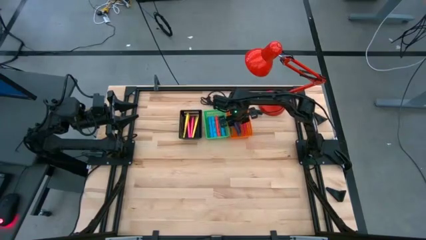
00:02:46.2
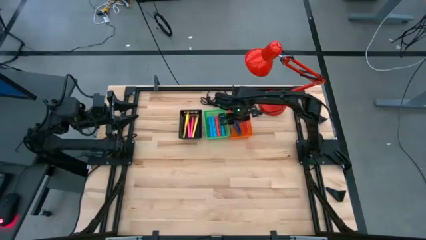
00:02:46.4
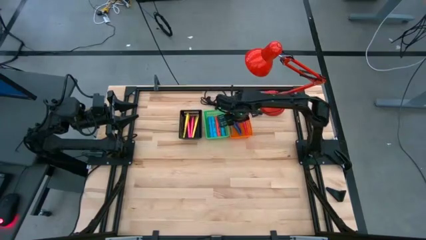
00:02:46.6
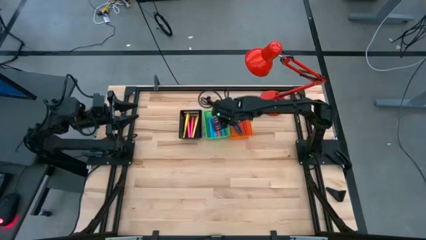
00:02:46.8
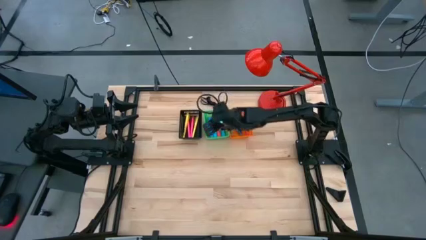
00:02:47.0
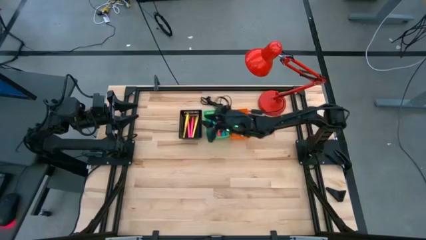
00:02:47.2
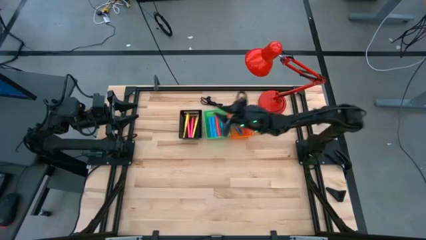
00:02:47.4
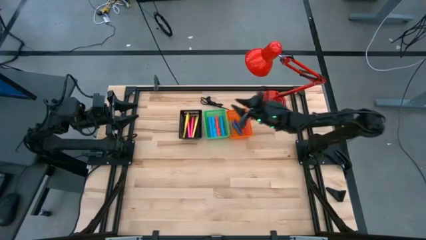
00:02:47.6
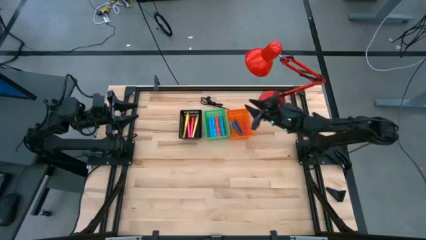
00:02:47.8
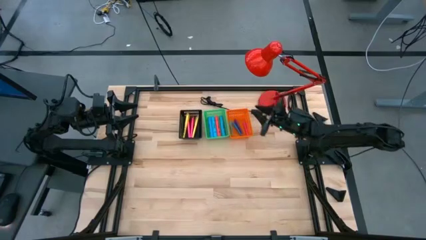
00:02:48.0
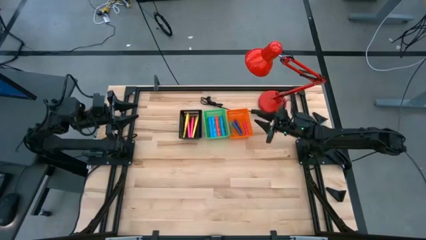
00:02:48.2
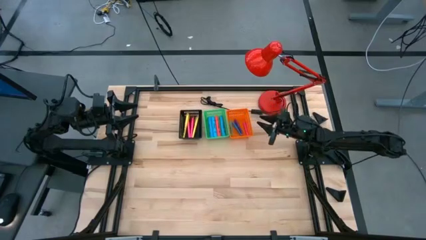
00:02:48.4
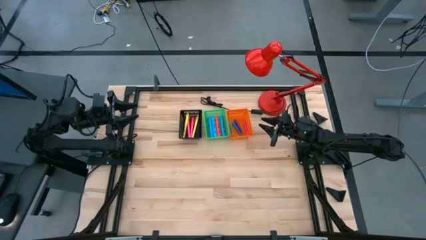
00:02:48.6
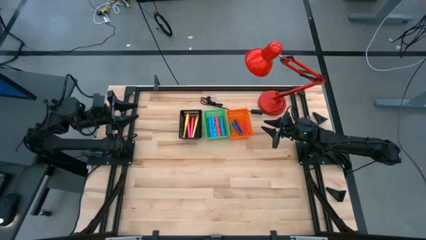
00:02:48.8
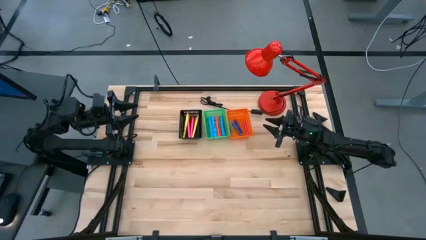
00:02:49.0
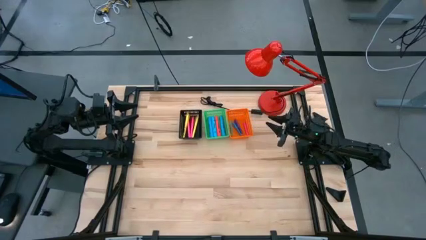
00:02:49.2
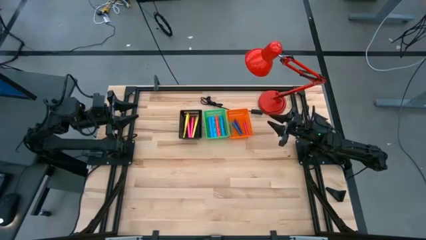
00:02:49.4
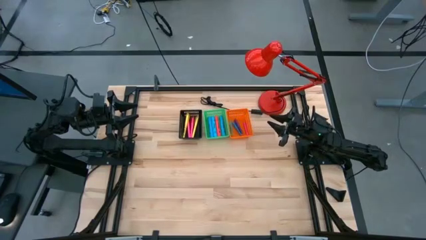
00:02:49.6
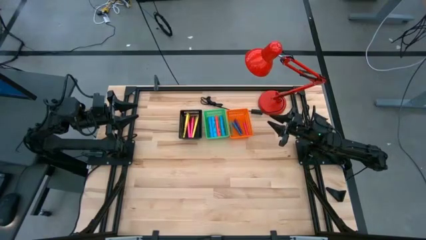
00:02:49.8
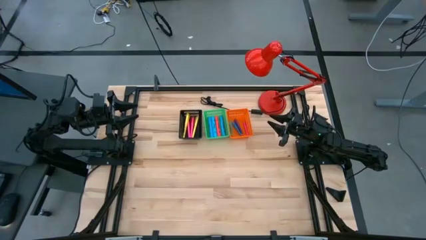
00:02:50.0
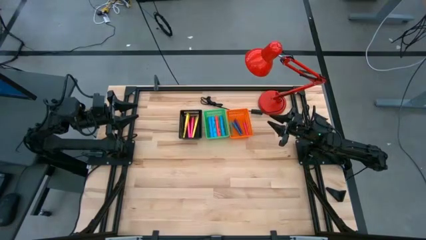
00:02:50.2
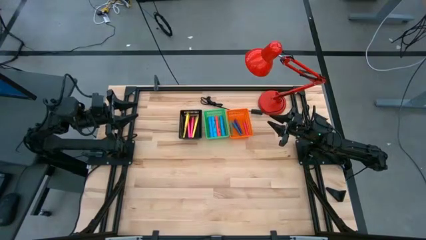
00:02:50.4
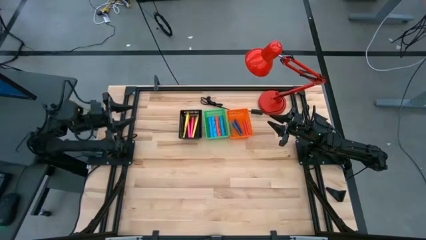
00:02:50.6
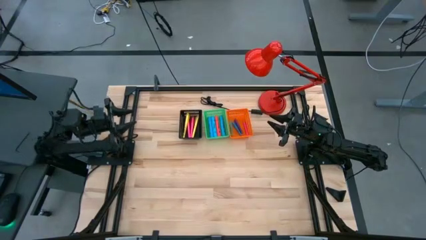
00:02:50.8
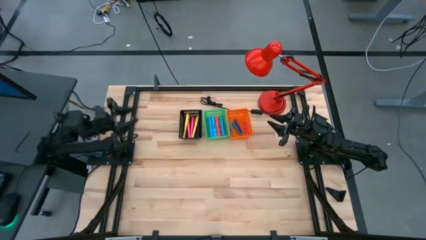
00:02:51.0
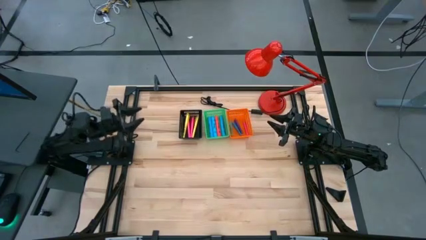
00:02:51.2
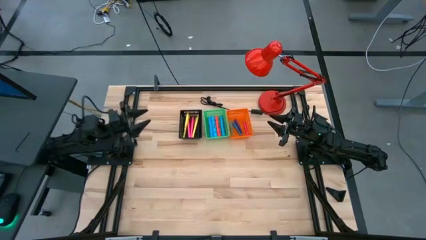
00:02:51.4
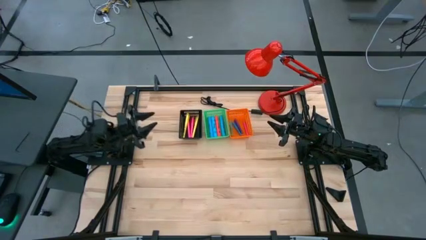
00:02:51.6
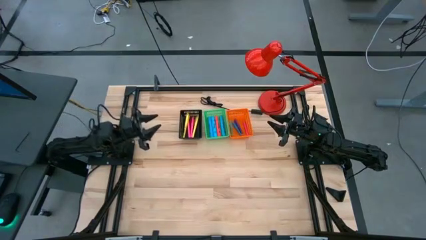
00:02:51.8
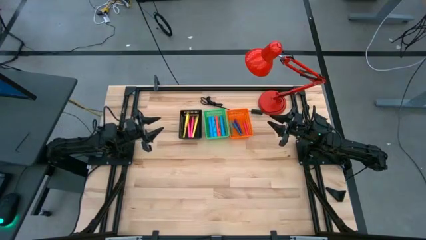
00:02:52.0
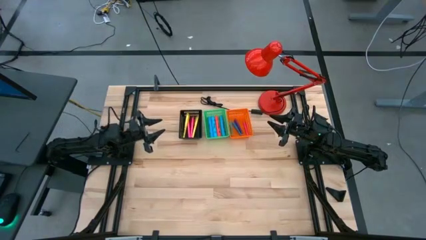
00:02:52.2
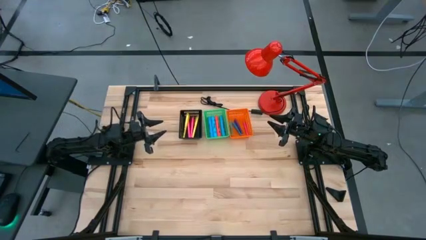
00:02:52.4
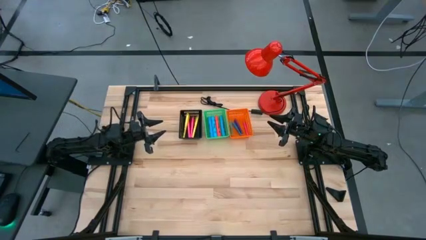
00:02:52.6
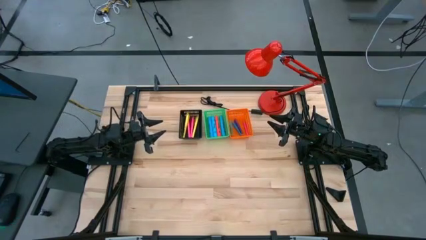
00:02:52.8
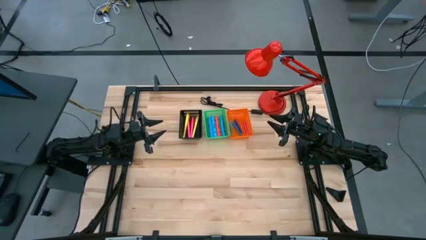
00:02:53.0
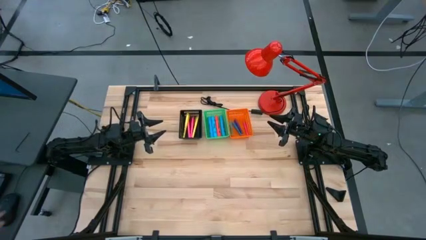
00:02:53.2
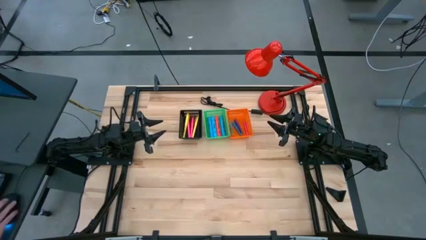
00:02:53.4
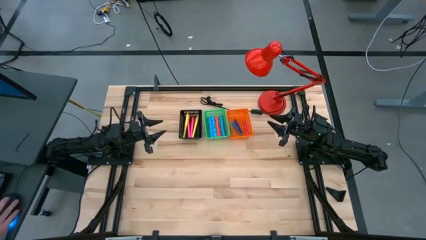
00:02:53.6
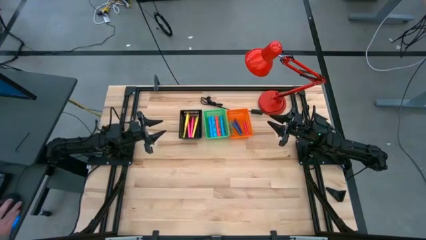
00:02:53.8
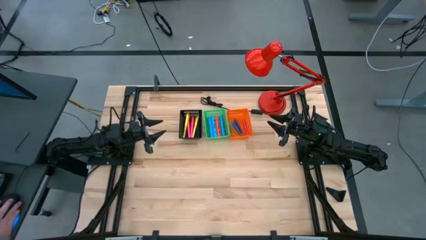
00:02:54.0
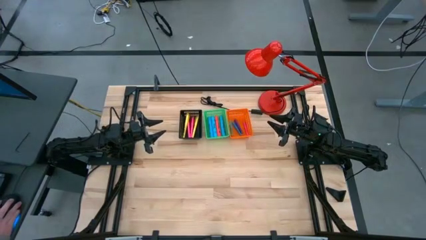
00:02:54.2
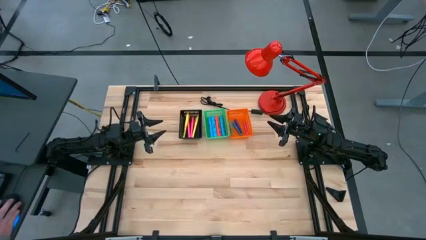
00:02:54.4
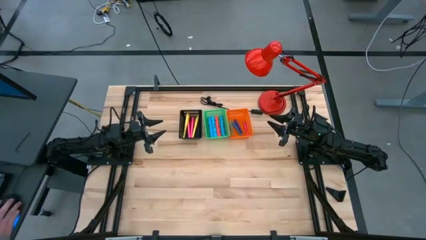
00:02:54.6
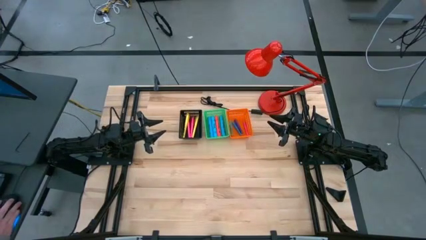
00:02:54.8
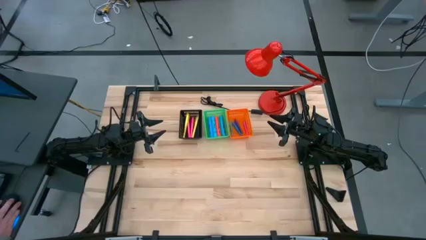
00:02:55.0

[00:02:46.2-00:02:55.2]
Task: Pick & Place Markers
Return to Home Position

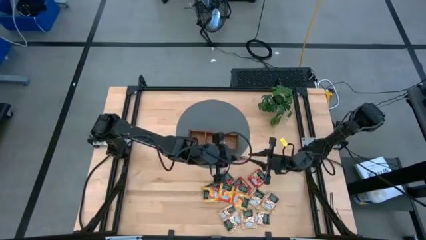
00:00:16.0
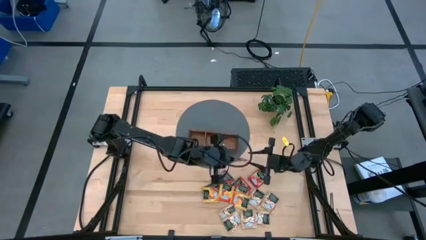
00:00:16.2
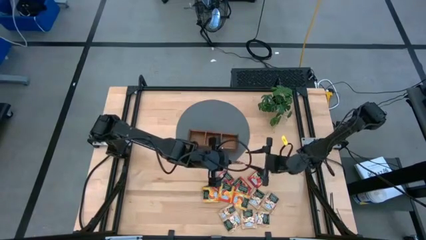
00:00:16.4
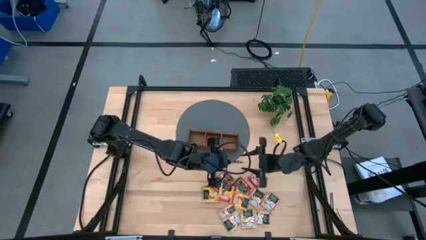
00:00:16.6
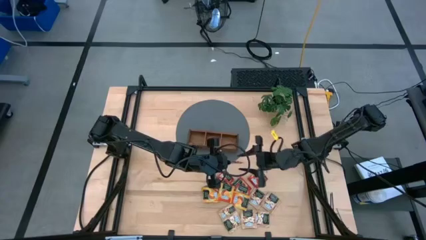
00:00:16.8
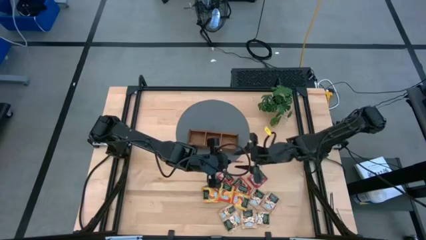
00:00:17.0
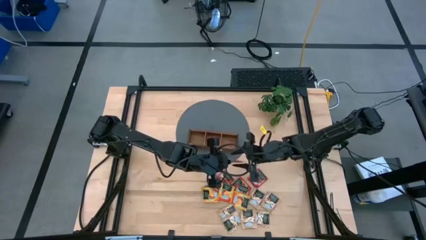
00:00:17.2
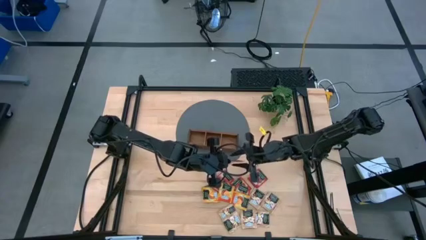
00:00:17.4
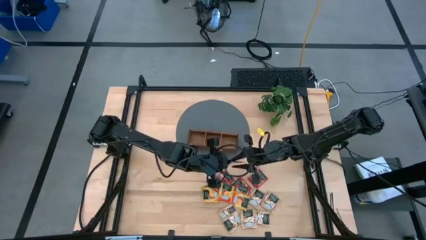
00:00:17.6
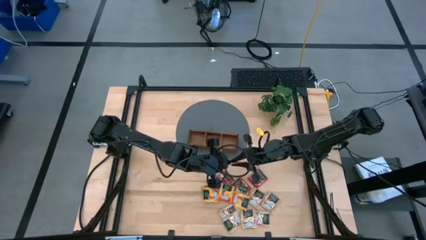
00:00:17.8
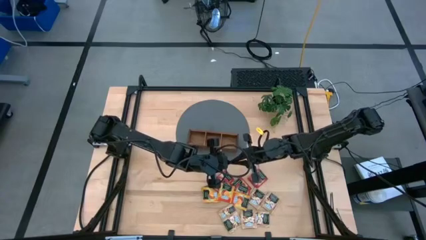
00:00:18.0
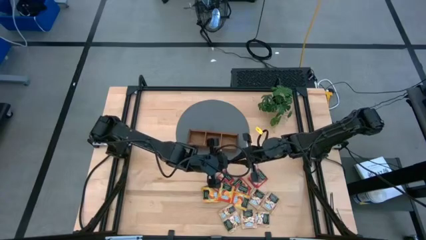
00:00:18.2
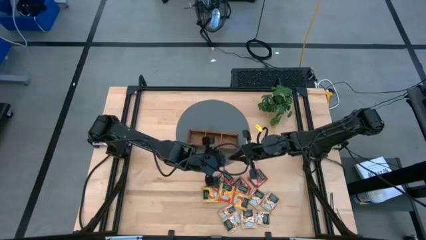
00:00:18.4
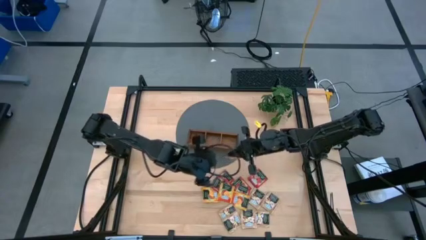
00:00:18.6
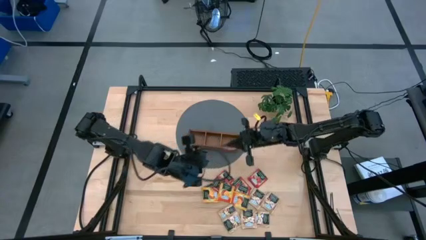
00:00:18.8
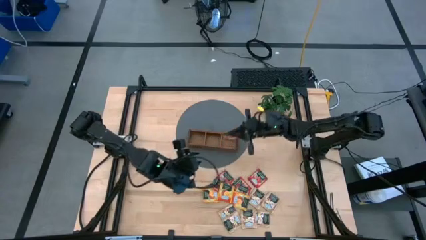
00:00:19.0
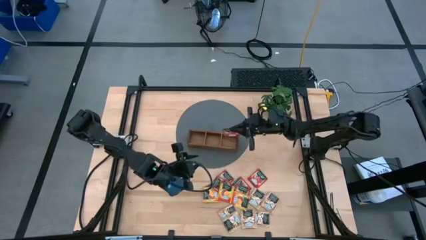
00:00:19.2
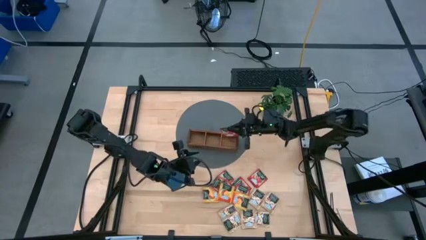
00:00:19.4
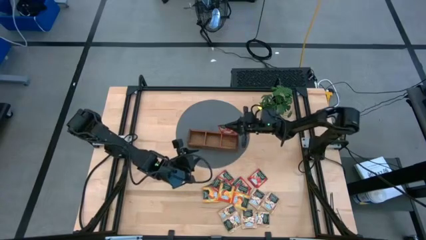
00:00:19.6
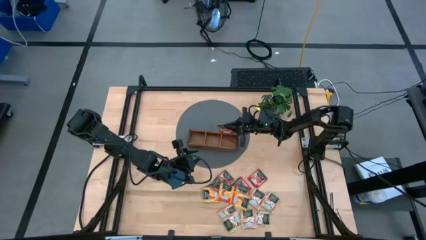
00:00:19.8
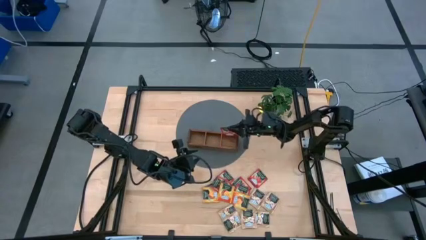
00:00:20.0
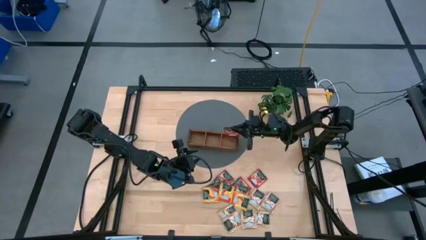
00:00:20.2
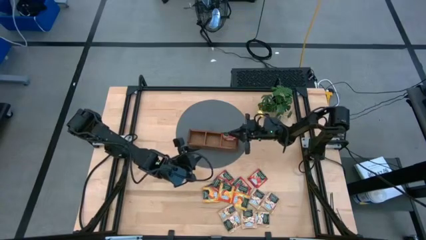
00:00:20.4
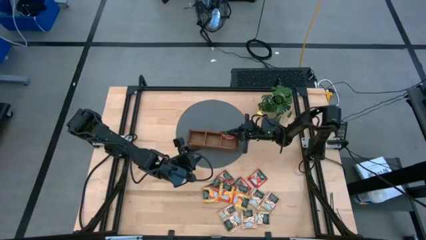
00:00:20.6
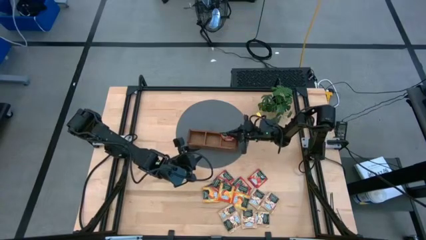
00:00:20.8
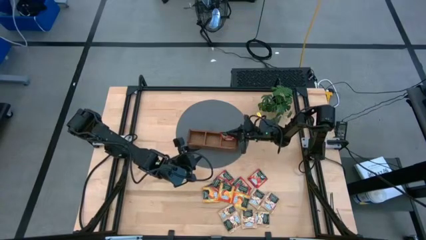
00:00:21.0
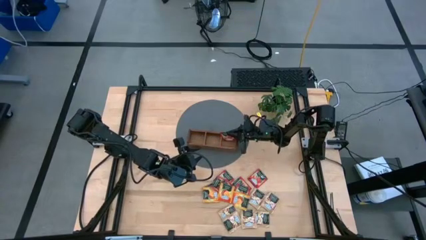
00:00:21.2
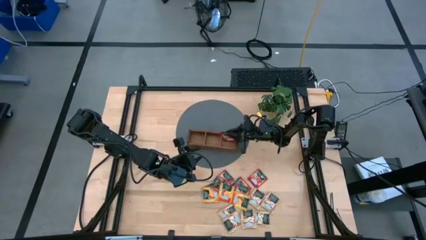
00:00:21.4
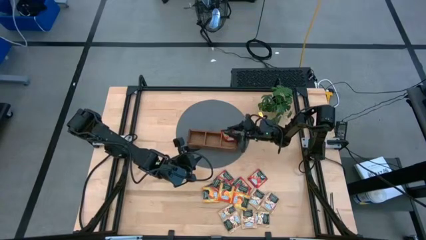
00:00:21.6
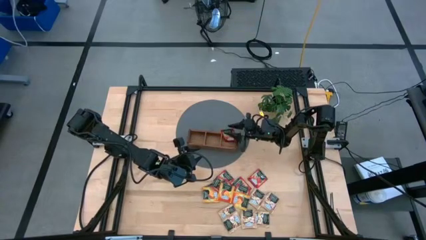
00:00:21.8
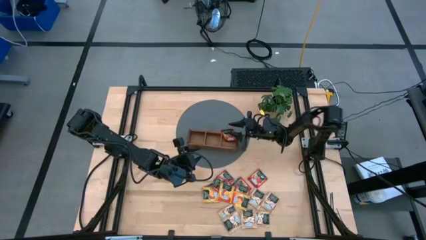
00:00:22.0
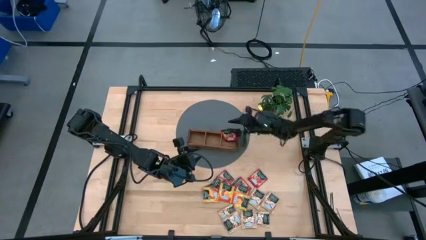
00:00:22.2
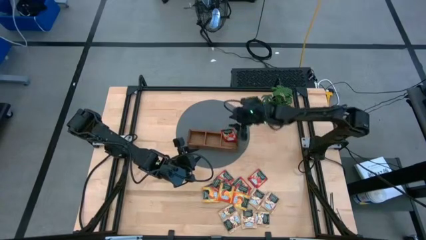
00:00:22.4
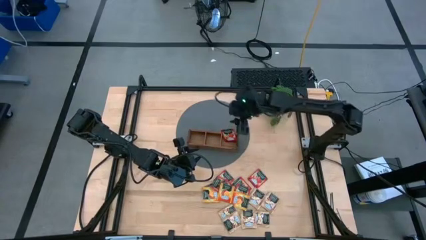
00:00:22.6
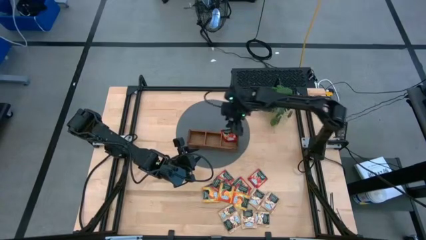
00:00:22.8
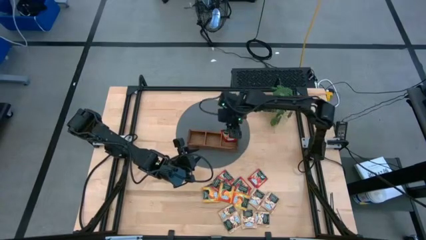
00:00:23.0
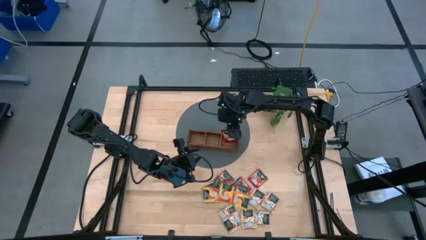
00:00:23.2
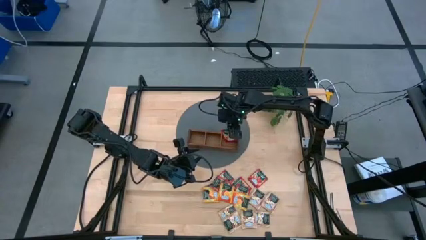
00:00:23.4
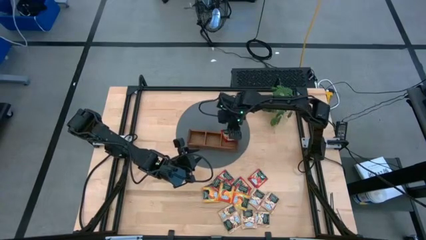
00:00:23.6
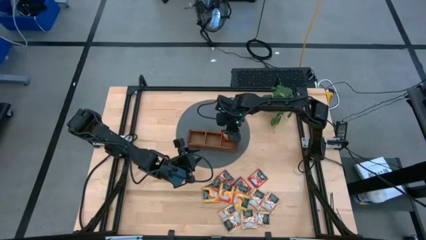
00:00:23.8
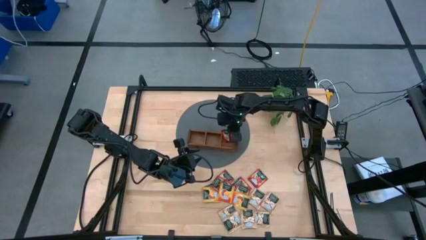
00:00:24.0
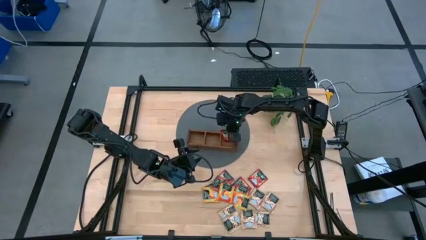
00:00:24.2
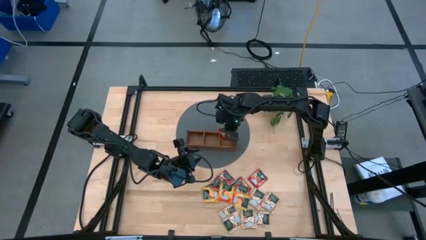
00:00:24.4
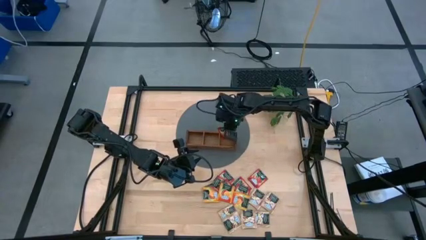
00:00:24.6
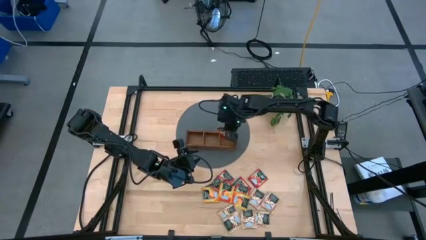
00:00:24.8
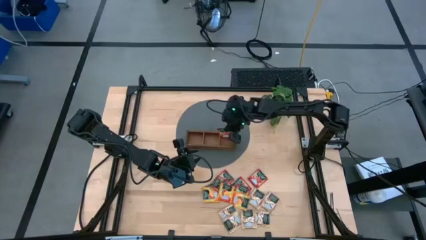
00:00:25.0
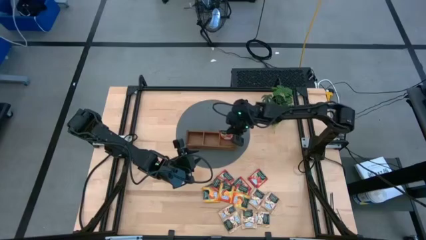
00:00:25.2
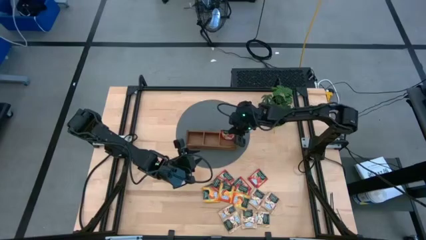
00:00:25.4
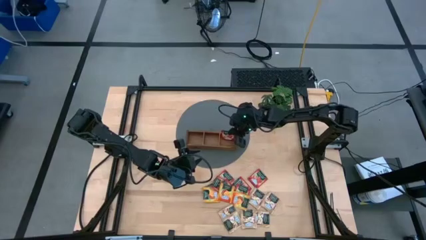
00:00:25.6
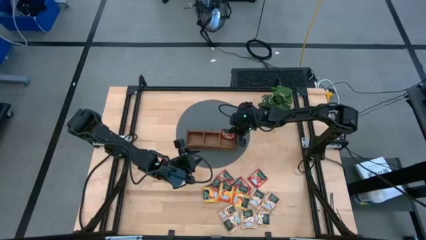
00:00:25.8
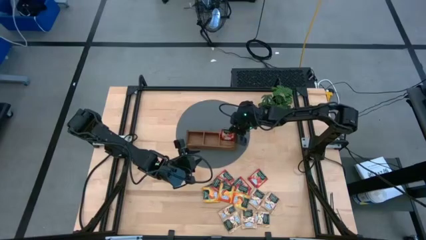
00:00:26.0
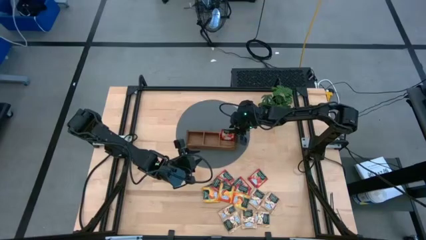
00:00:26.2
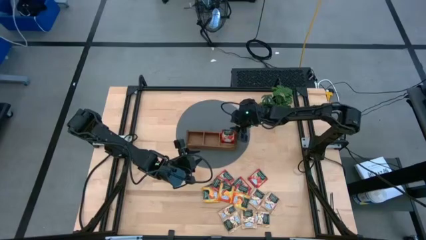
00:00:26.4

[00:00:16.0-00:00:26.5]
Task: Pick & Place Tea
Put the red tea bag into the right section of the wooden organizer
